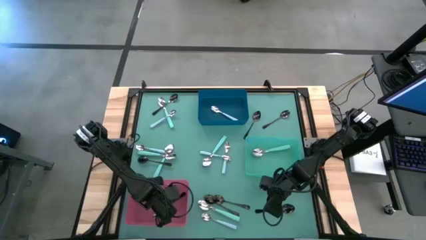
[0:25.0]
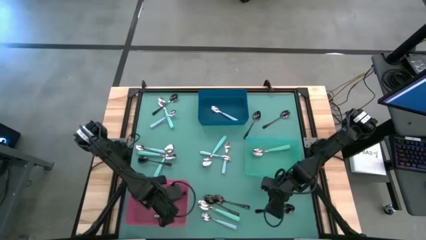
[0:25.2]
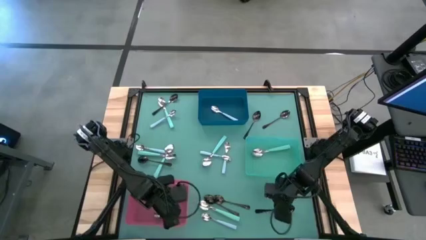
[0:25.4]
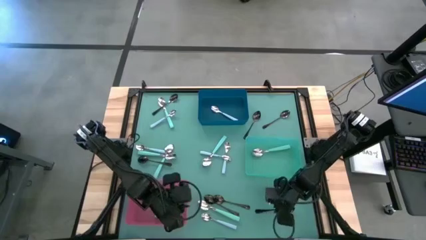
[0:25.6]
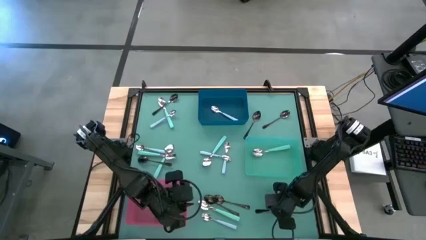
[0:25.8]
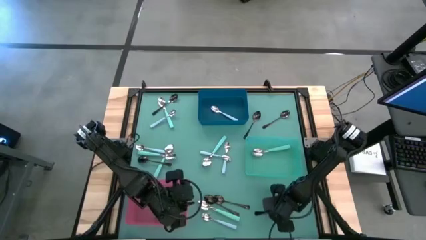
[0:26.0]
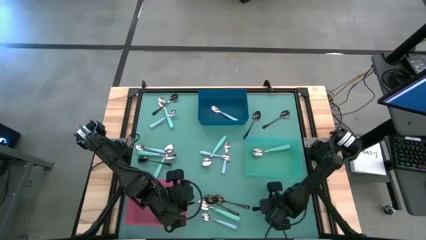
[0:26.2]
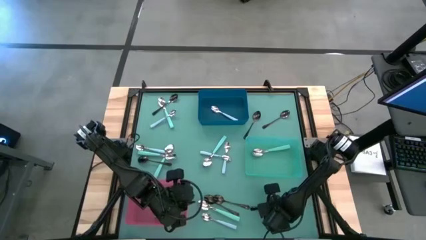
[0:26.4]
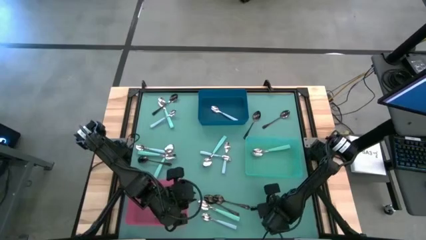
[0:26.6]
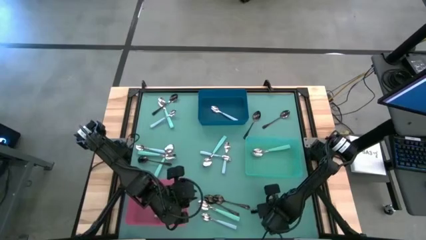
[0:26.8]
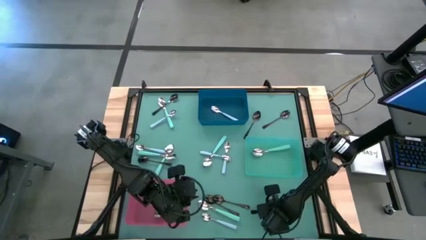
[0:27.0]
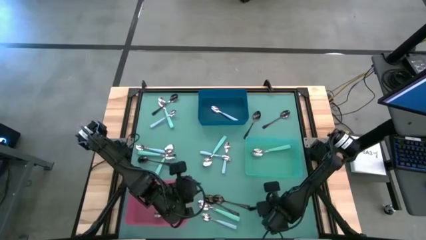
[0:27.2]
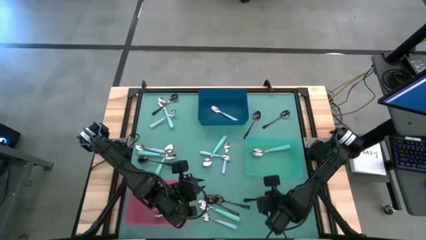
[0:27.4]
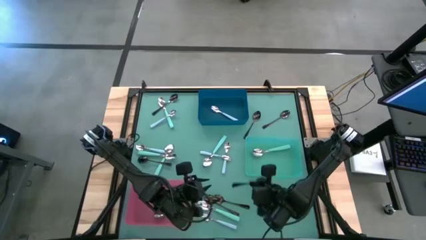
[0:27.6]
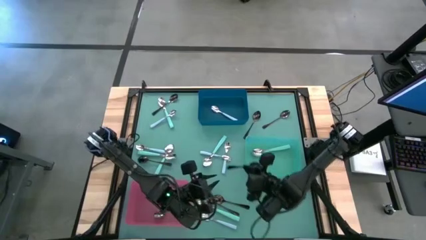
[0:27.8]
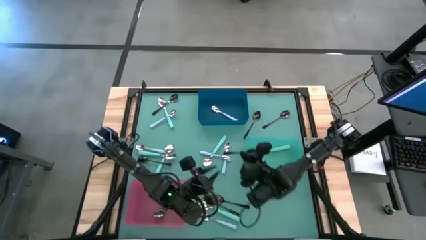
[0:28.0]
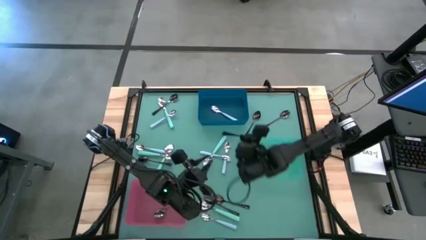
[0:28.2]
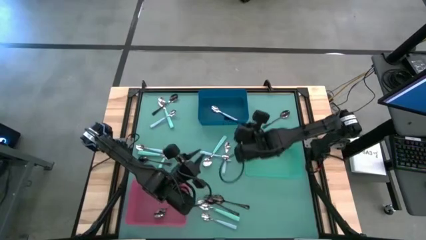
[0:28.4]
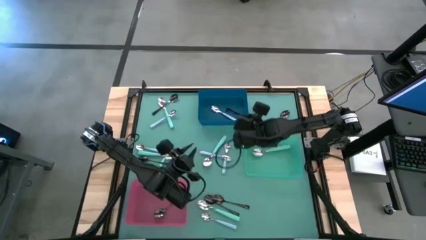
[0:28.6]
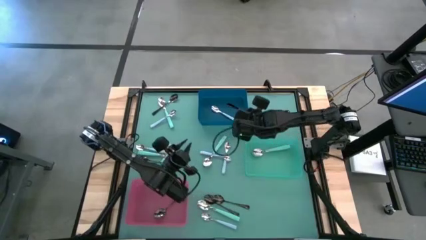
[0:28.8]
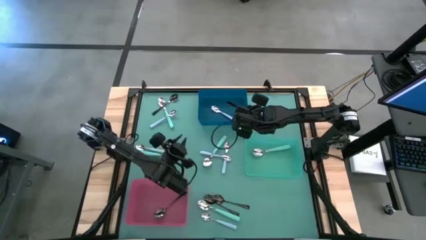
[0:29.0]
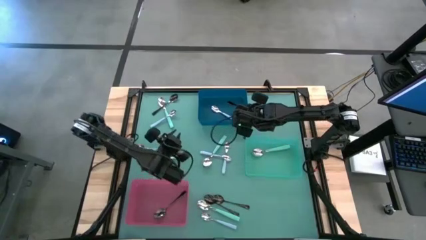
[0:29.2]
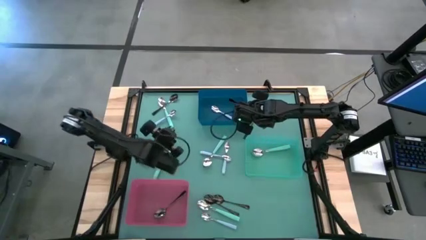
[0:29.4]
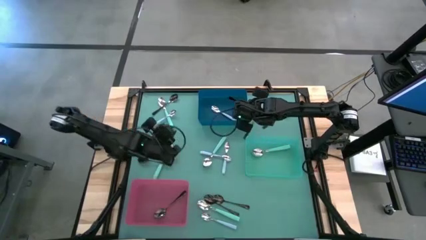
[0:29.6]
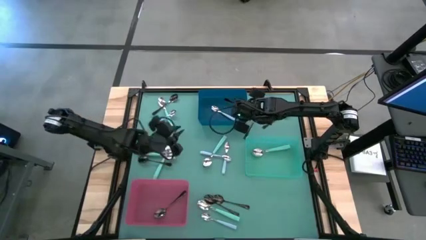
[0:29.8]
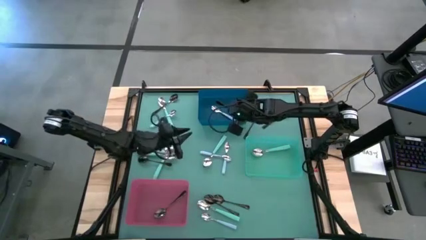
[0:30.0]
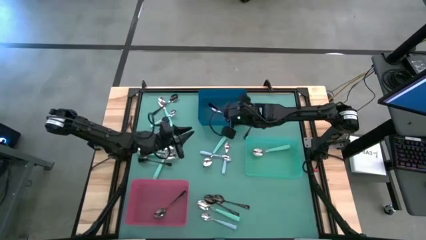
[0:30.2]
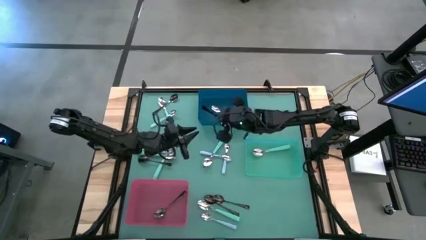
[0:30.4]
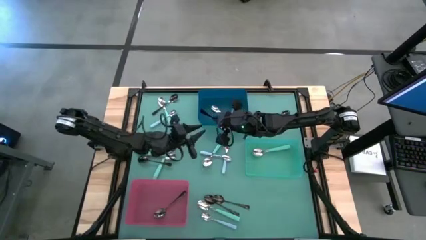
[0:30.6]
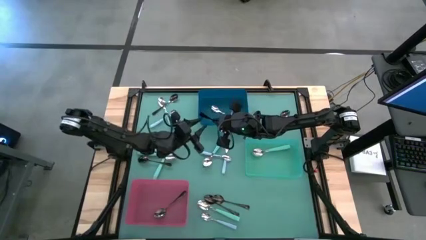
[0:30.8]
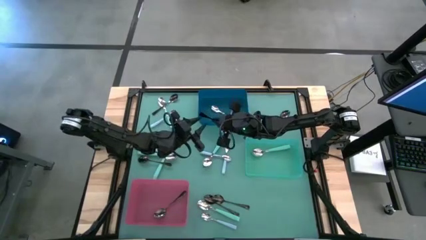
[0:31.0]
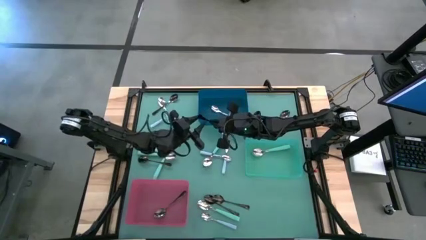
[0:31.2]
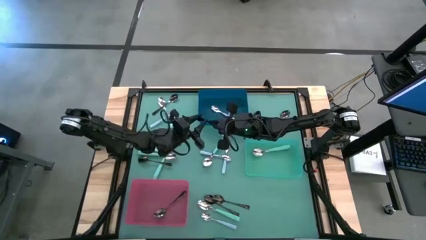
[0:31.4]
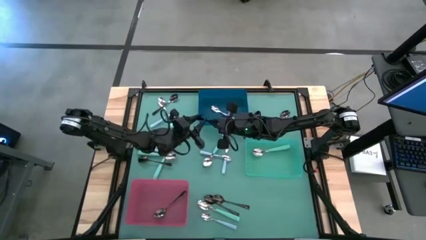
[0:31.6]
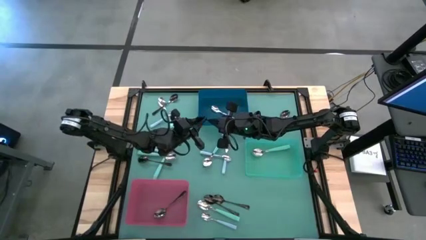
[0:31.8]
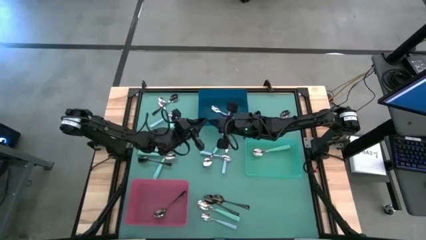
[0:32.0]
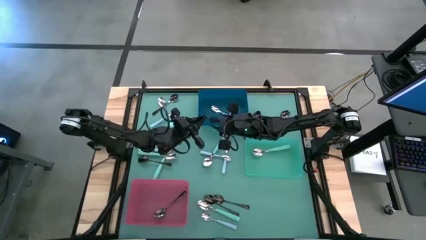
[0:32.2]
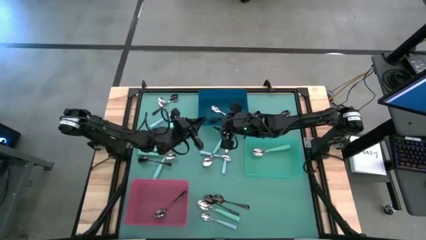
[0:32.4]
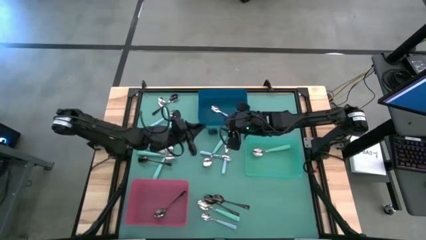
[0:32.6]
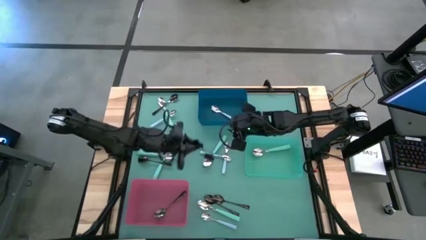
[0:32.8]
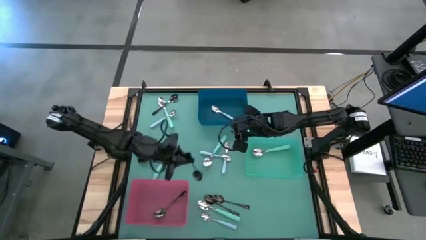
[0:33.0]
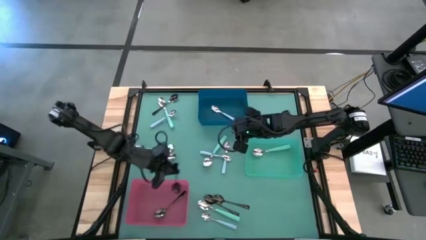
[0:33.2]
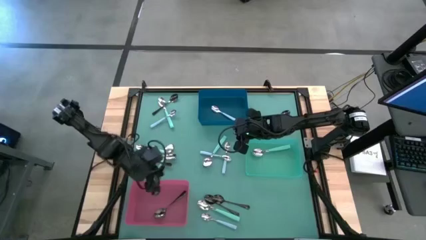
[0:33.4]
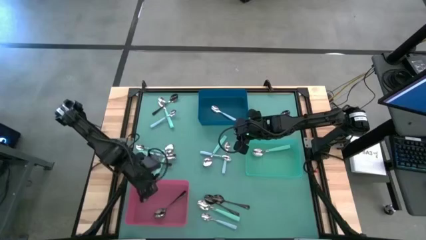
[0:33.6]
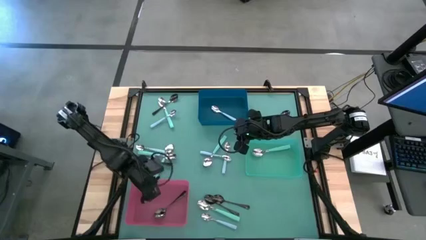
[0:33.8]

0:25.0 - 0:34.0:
Task: Sort silverware by color (type)
Put the black spoon into the red bin

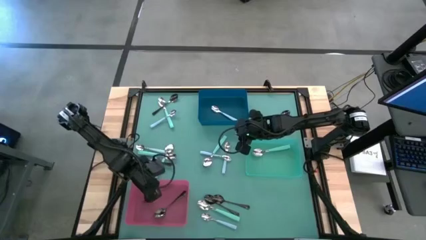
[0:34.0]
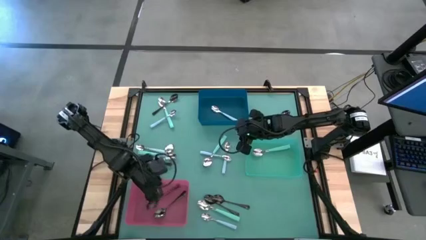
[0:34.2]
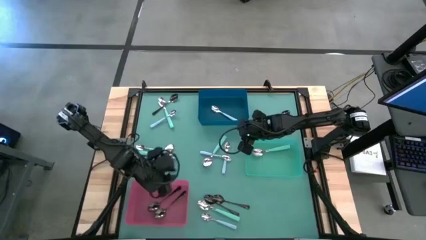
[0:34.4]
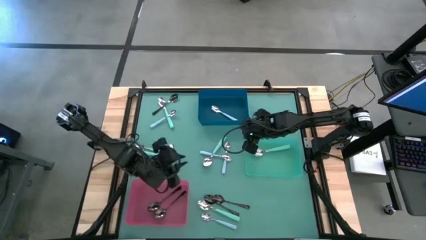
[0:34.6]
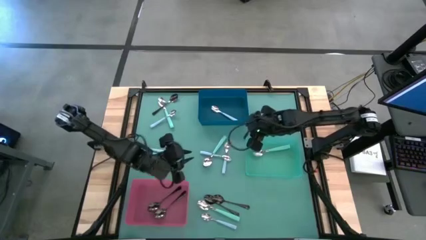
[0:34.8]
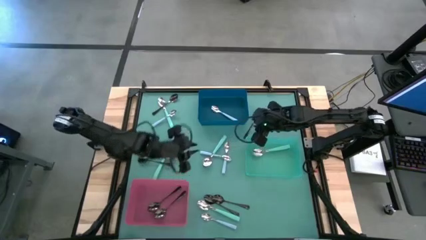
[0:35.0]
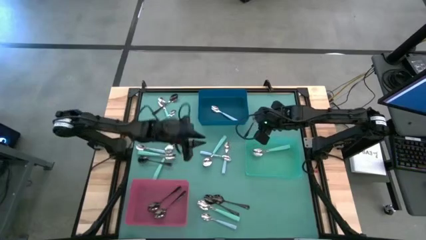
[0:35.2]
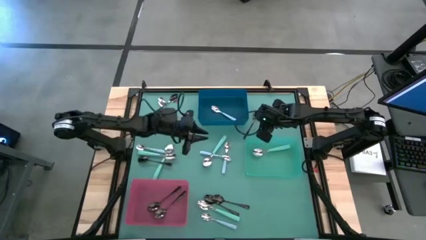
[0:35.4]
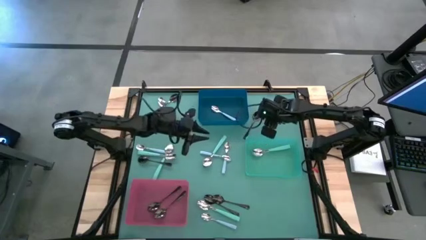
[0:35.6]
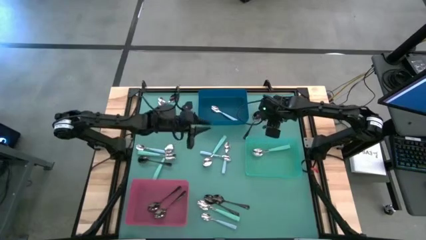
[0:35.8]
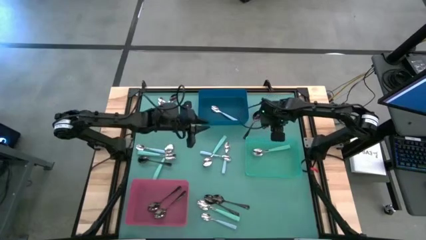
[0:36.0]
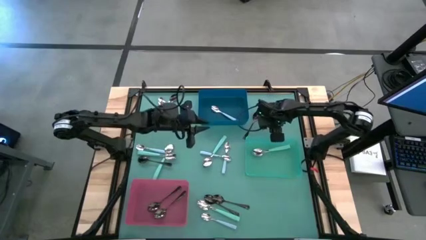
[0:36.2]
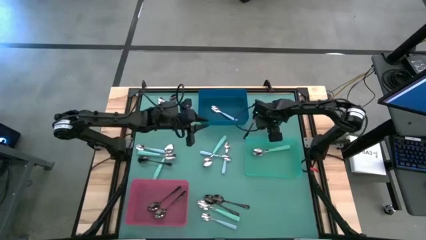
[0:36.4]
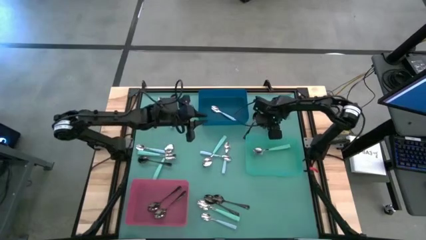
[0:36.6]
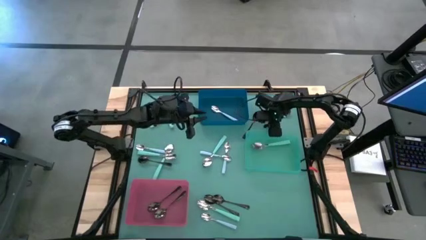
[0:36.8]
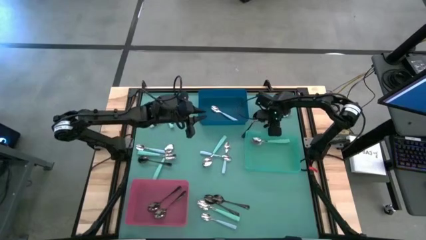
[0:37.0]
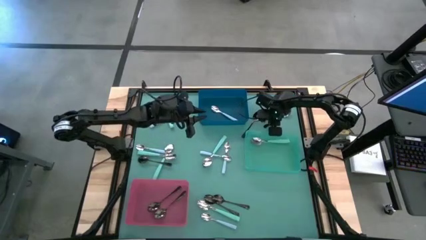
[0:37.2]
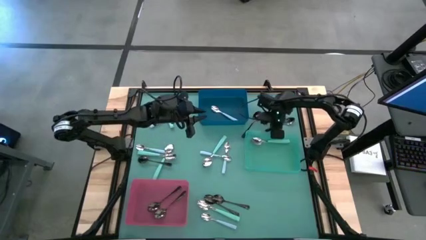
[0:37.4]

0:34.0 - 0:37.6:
Put the black spoon into the red bin

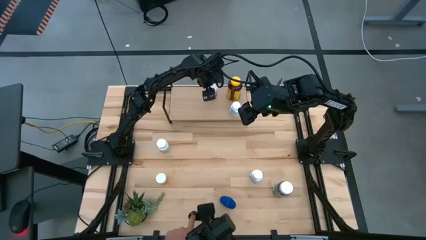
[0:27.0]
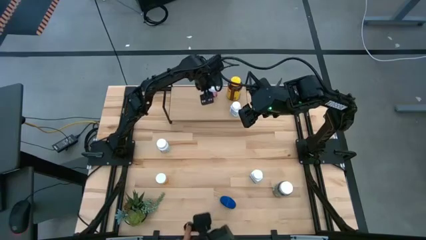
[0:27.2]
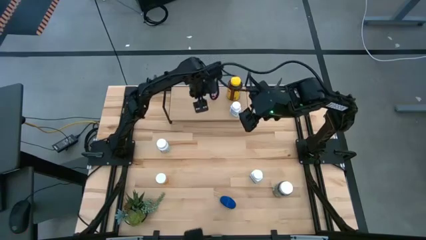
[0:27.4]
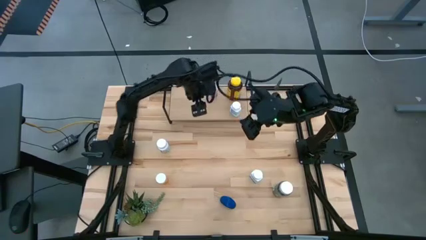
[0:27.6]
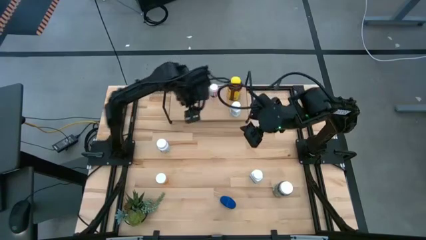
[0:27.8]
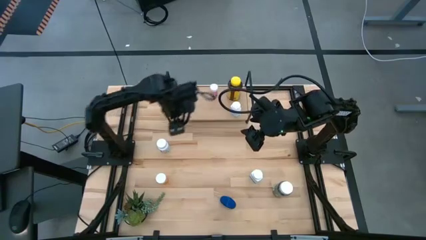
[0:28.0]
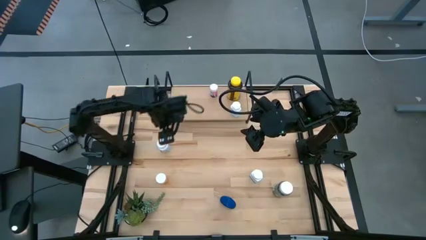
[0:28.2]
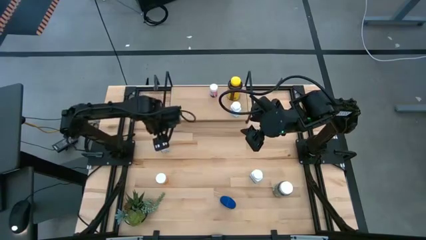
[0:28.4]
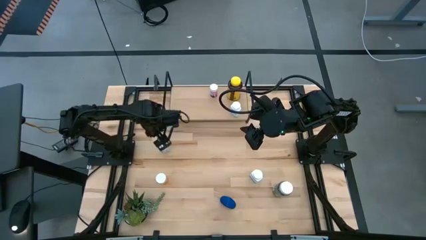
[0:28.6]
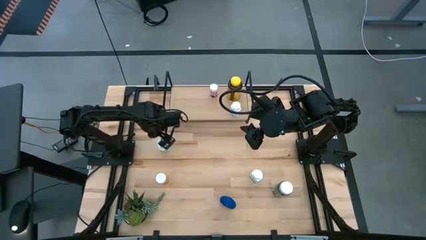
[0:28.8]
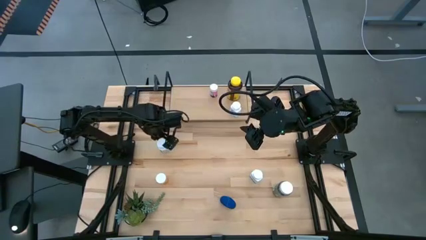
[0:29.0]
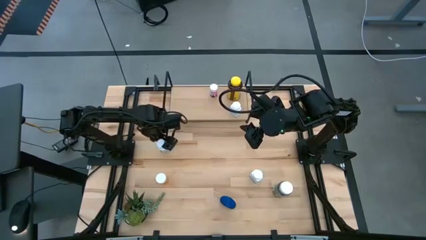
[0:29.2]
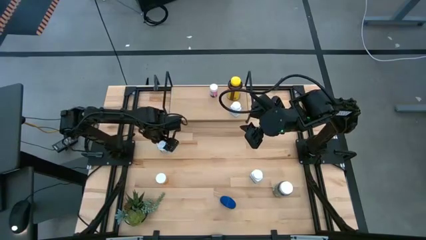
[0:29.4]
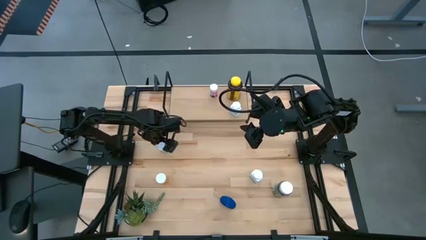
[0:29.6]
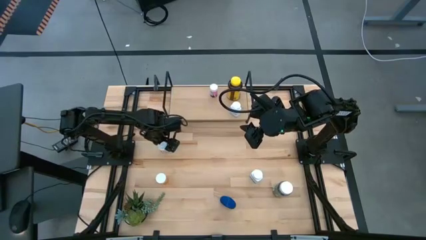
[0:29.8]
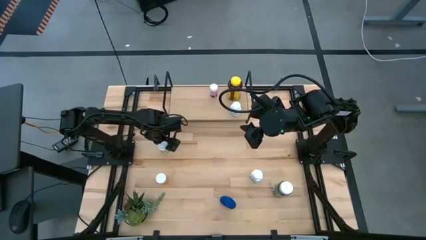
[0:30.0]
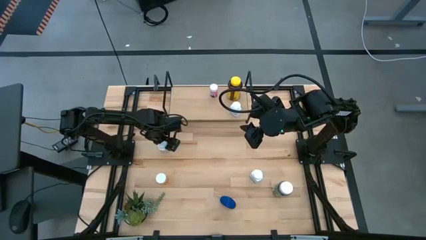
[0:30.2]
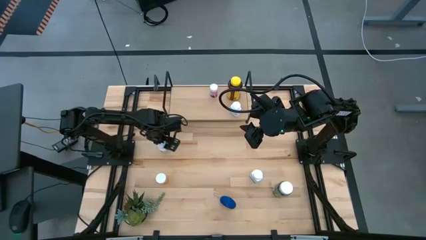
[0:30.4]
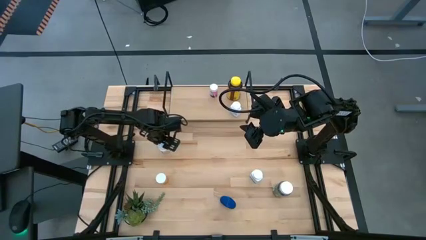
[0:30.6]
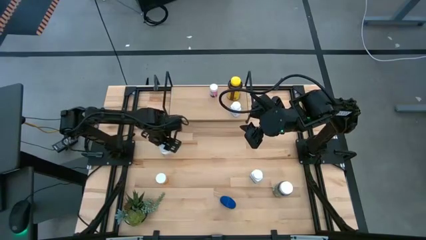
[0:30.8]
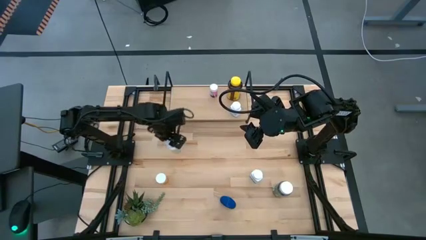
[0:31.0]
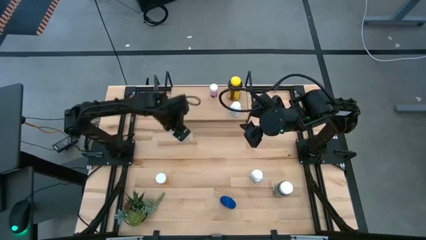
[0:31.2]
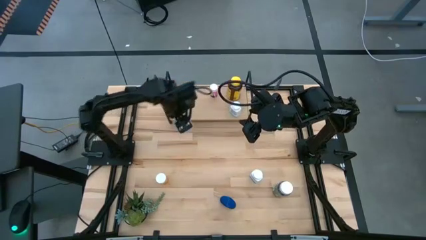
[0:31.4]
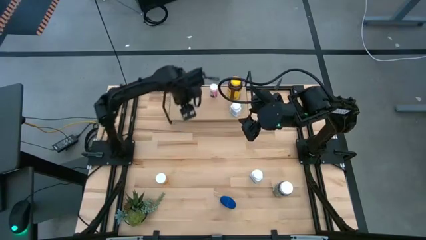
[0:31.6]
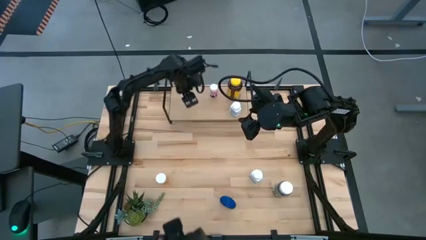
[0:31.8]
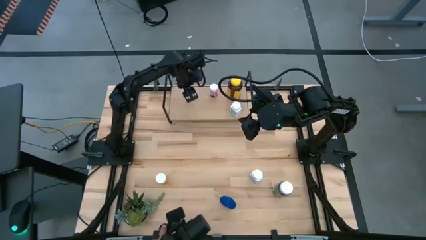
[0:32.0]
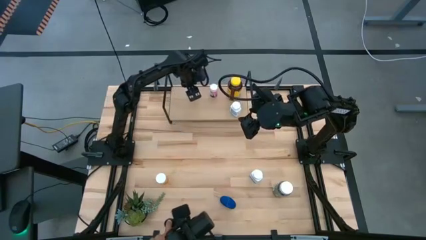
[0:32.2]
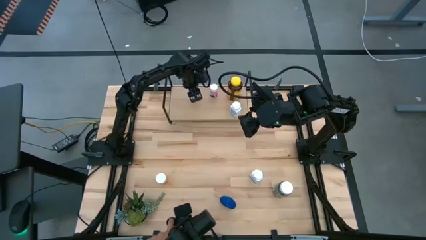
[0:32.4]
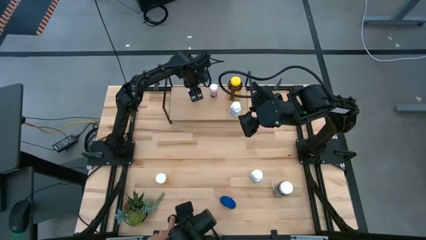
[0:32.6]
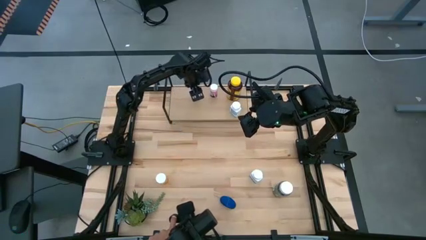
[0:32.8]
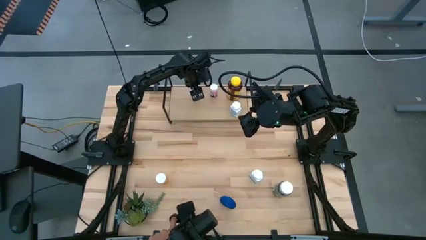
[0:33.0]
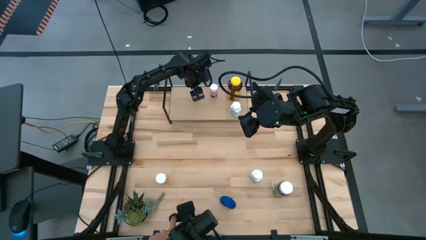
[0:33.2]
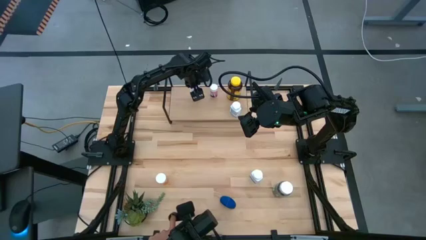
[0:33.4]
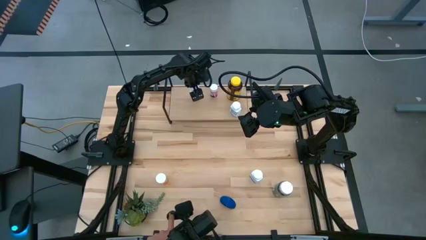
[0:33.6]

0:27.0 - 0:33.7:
Task: Pick and place medicine bottles onto shelf by color
Put the left white pill bottle on the shelf
